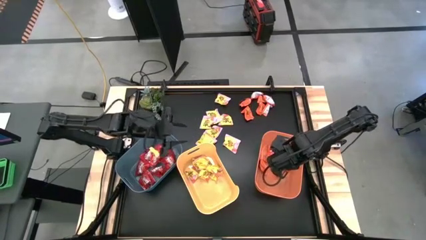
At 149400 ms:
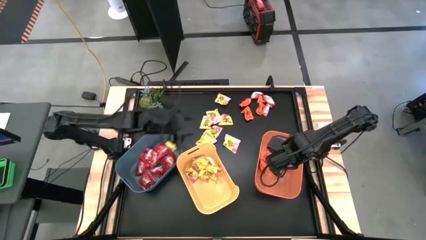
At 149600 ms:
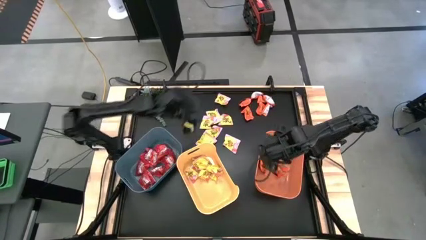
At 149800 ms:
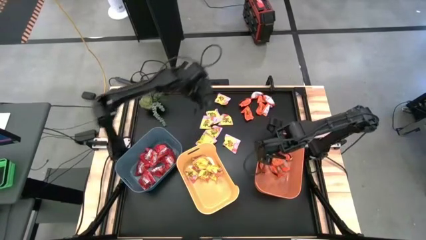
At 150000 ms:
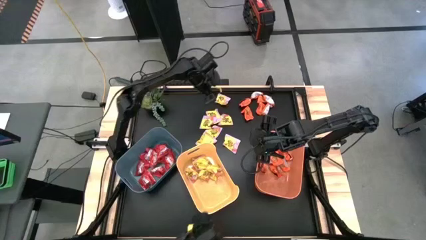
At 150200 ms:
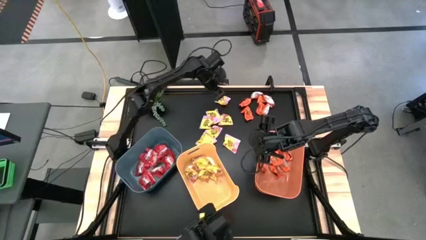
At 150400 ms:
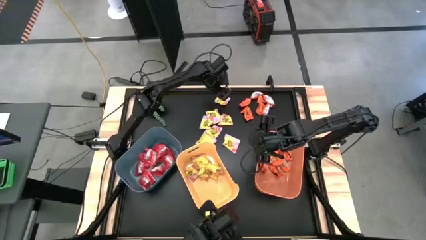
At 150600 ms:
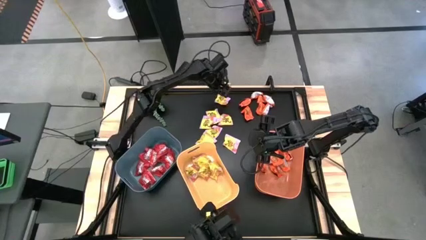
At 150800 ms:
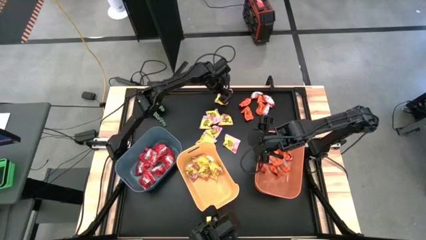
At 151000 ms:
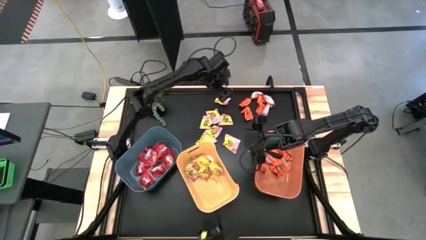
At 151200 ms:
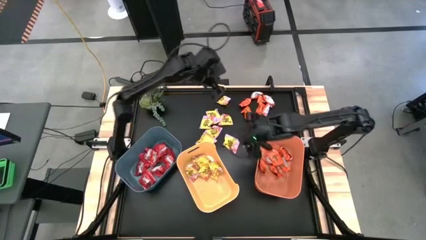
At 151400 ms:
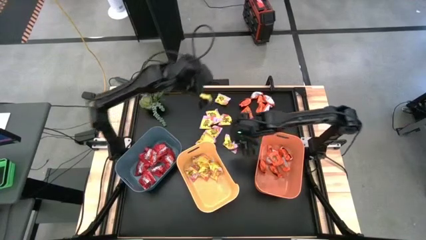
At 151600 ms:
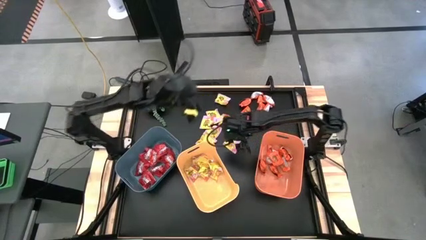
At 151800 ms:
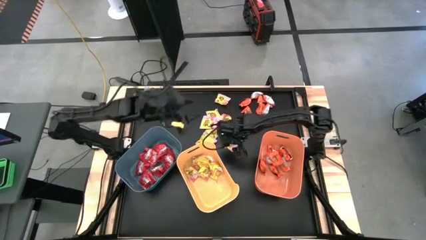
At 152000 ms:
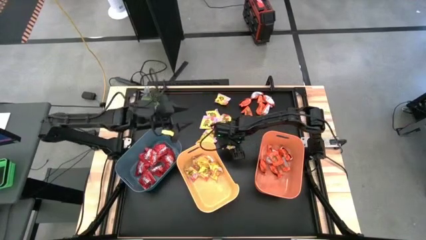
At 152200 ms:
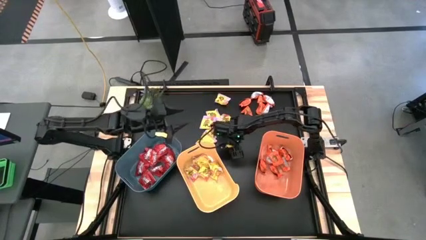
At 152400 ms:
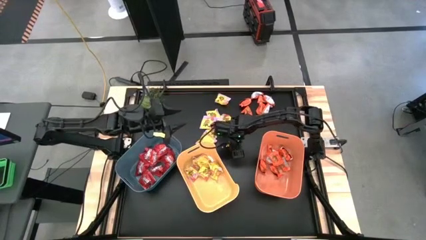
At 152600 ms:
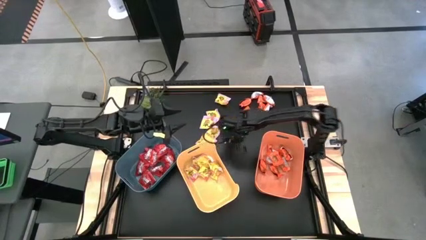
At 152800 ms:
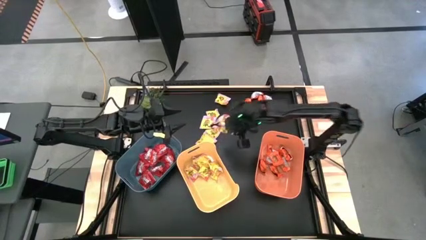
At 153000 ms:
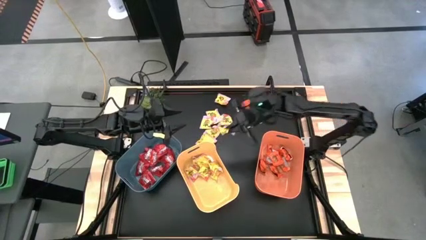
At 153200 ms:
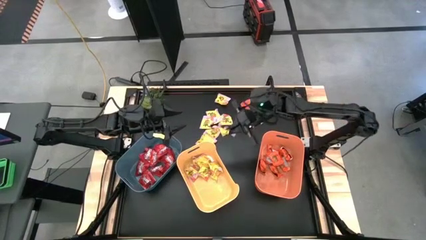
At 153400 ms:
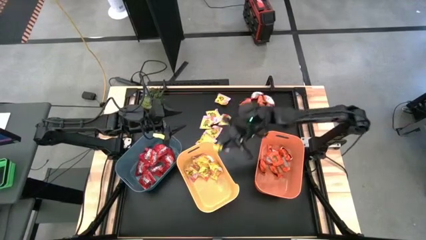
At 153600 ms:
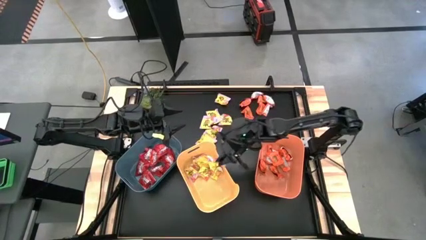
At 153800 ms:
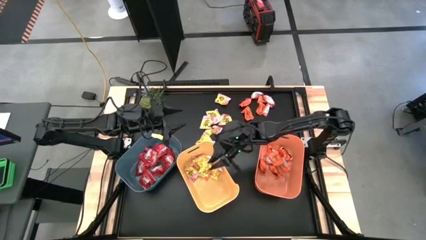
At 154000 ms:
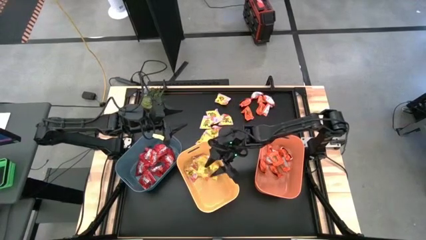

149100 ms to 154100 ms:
Task: Sort candy
Put the yellow candy into the yellow bin

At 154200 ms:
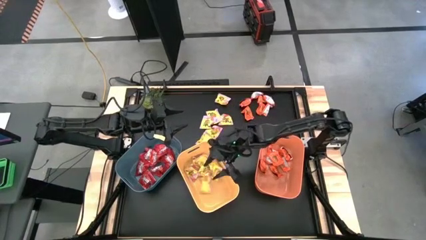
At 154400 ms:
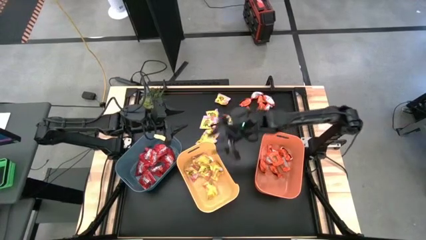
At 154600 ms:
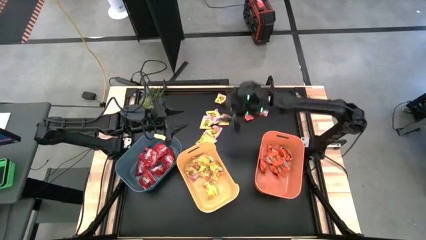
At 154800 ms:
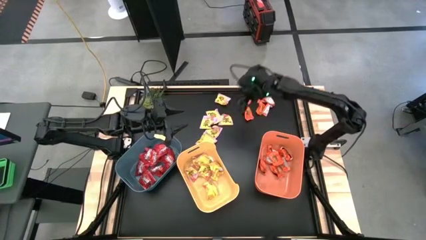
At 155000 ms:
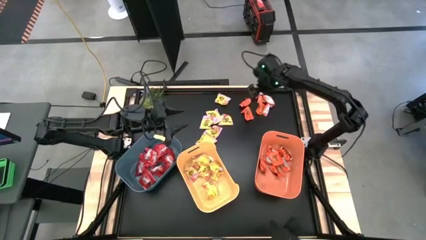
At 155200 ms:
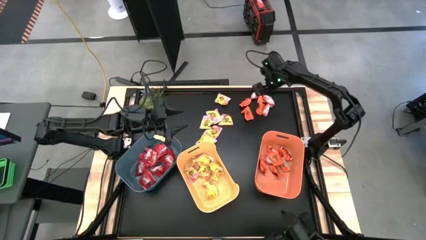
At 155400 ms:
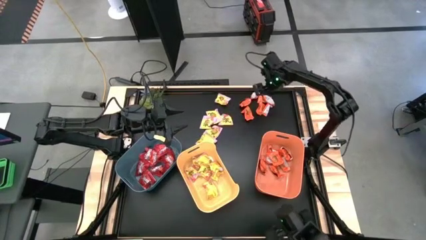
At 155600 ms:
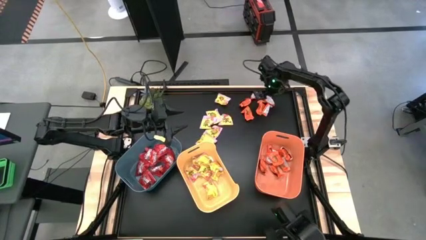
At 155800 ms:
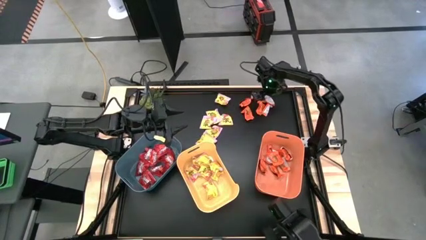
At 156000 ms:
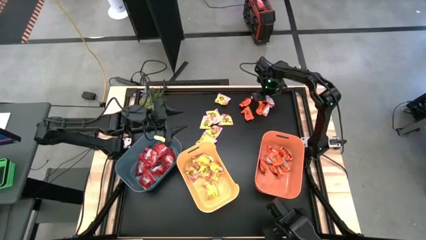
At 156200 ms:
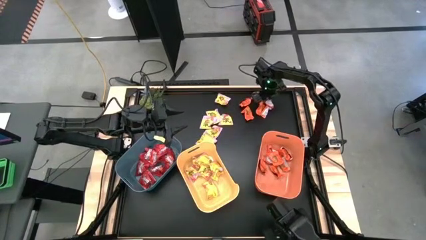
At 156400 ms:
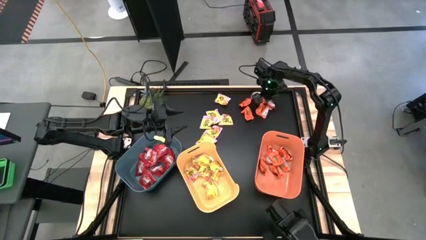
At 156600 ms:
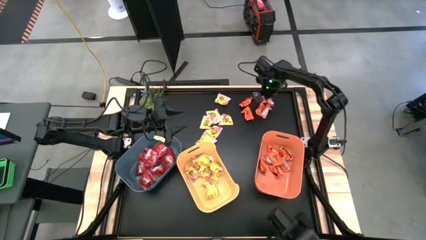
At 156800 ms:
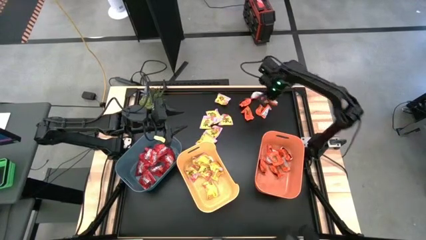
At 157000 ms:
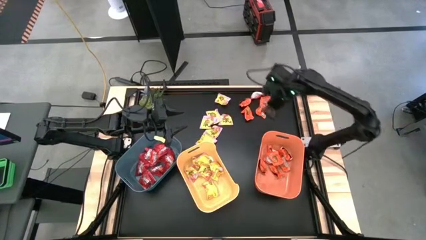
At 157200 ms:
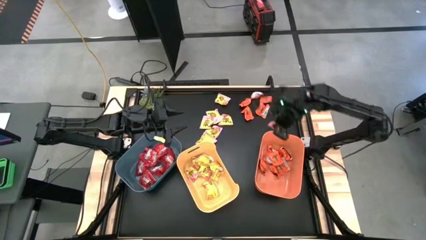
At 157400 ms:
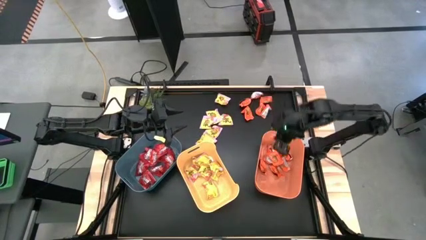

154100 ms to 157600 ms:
Put the orange chocolate into the orange bin

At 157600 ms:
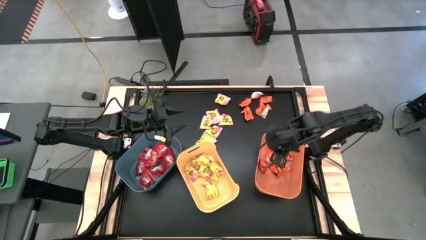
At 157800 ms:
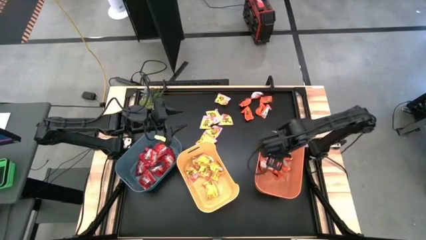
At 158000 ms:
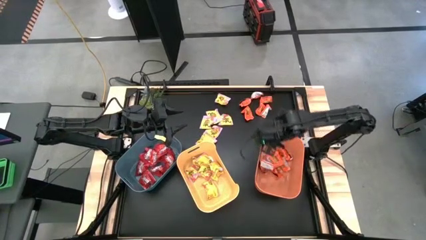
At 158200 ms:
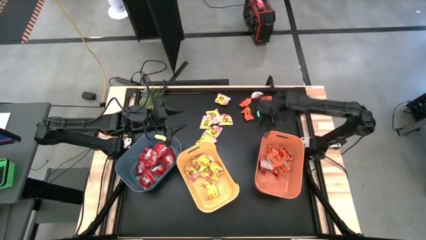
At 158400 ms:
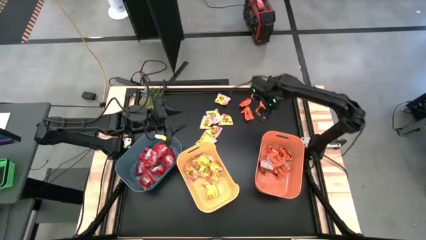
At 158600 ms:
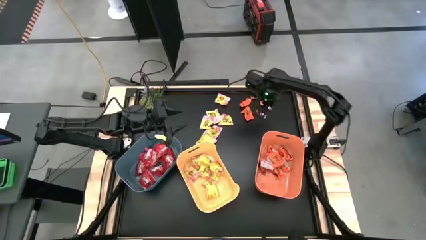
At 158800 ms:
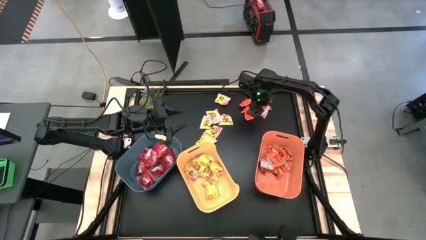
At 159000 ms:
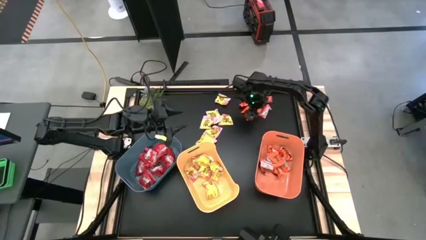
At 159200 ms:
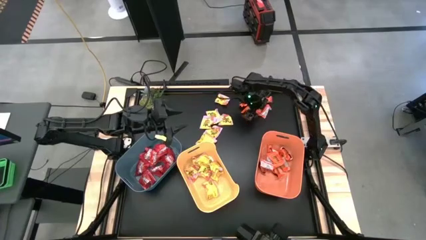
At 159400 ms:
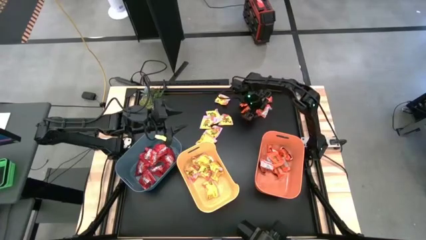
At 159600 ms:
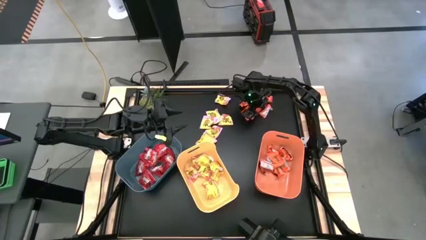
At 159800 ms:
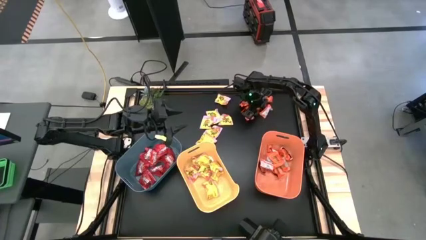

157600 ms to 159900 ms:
Put the orange chocolate into the orange bin

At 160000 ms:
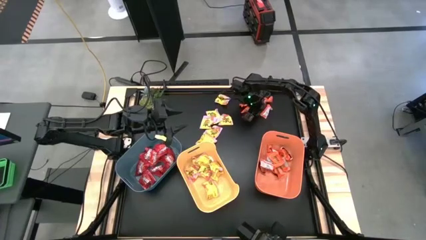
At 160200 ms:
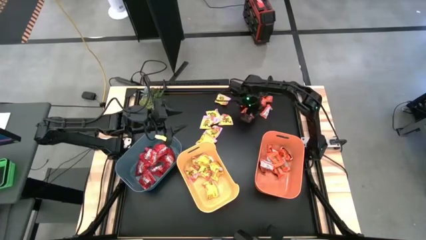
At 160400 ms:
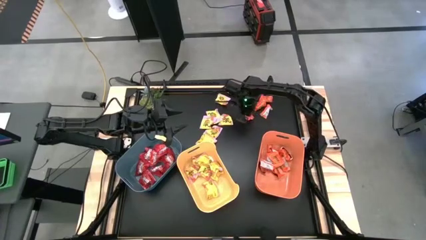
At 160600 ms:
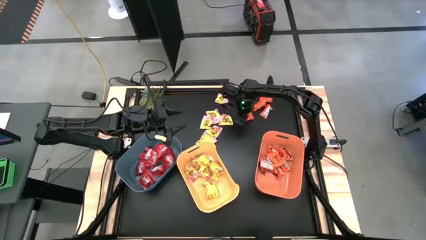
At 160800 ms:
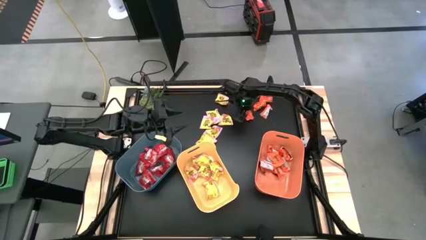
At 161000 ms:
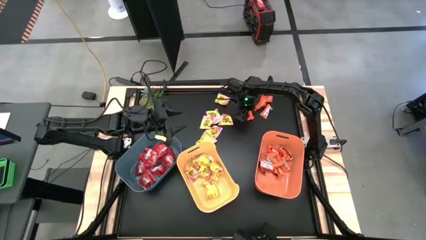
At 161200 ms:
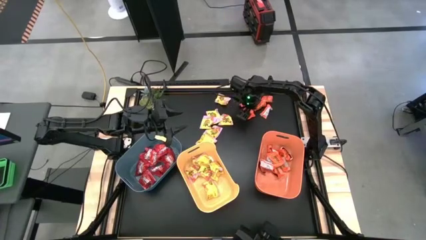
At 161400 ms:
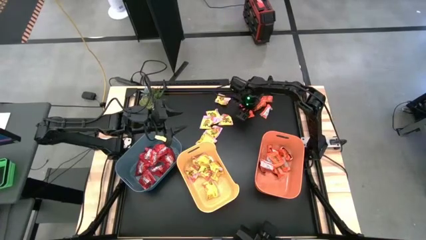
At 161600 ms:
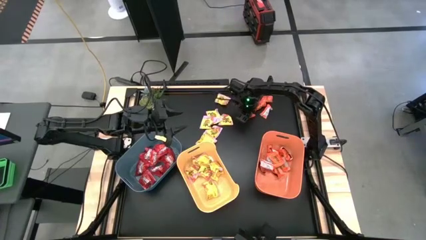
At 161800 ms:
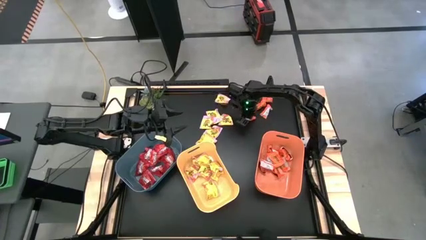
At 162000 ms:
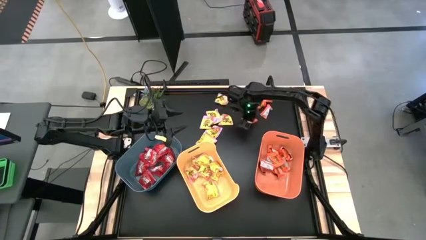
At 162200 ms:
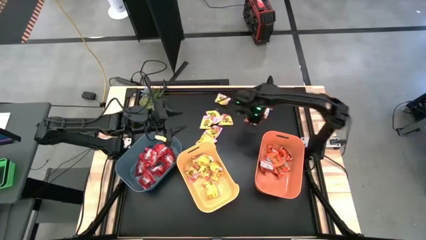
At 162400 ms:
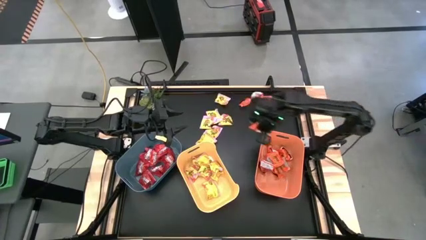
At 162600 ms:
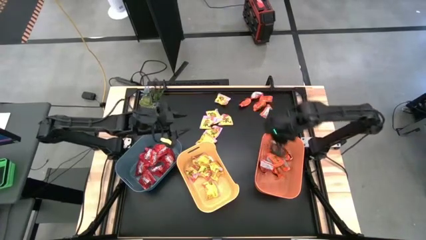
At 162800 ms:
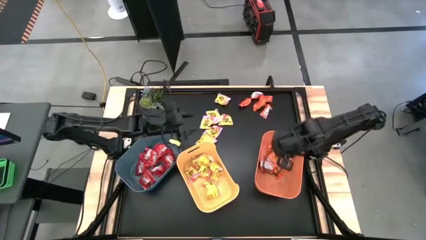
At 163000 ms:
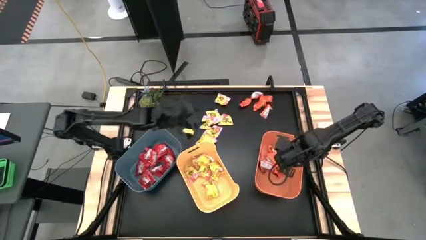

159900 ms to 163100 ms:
Put the orange chocolate into the orange bin

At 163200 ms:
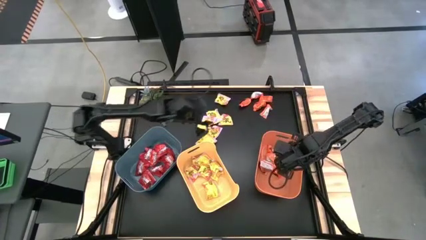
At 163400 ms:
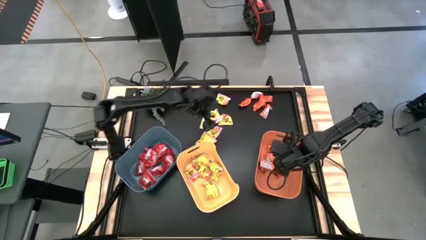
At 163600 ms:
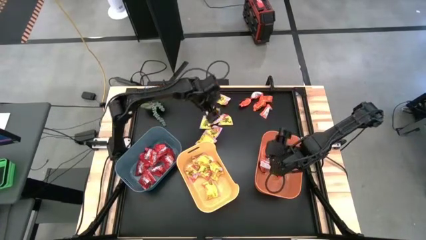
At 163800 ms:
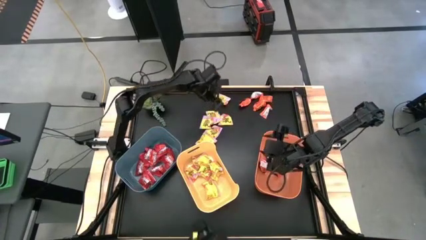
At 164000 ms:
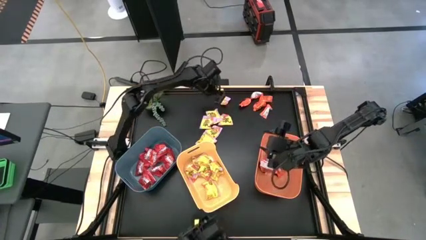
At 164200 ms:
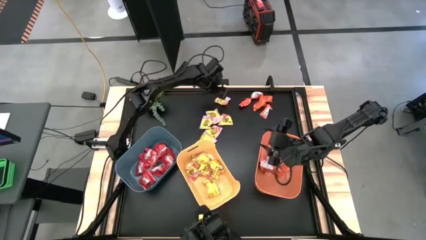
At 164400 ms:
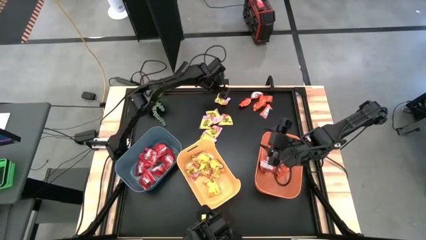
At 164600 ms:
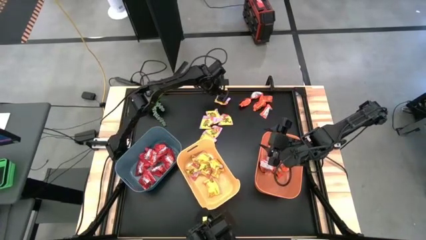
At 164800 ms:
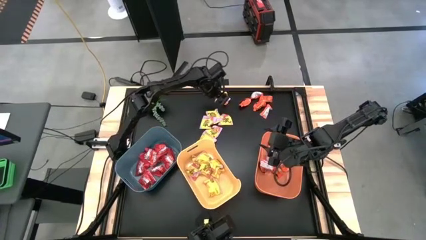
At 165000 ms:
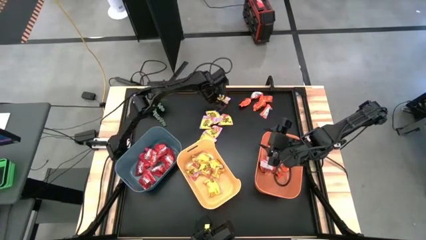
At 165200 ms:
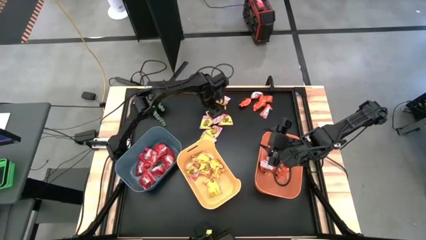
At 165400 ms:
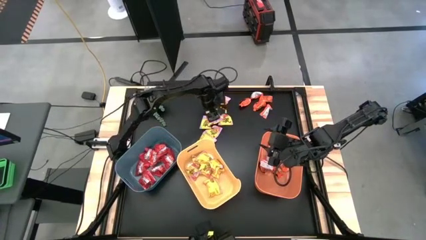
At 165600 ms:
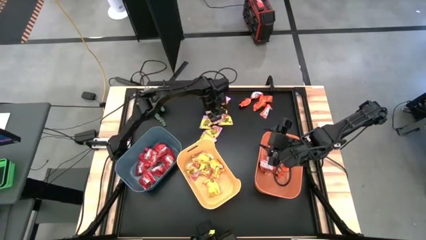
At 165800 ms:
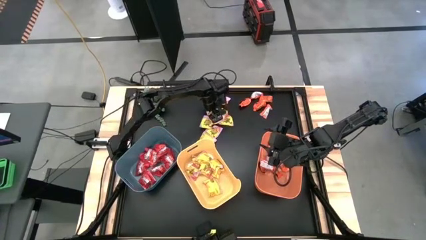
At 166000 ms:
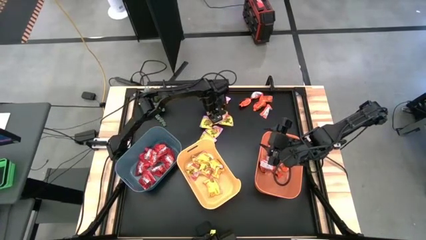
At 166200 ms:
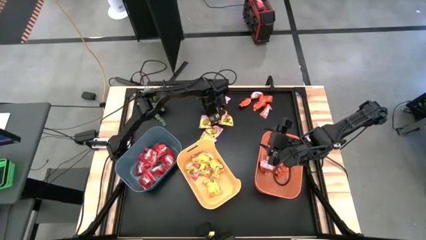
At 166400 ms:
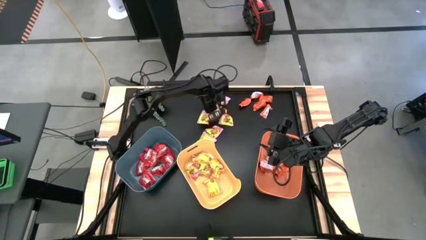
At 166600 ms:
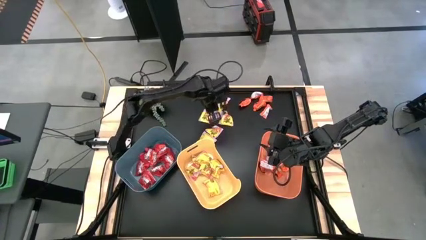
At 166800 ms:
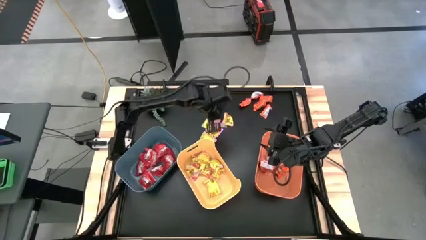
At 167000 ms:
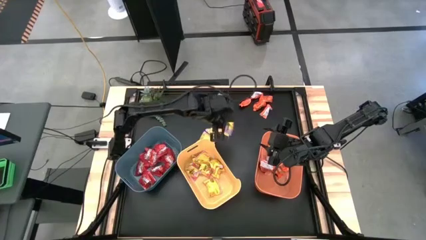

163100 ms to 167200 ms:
Put the yellow candy into the yellow bin

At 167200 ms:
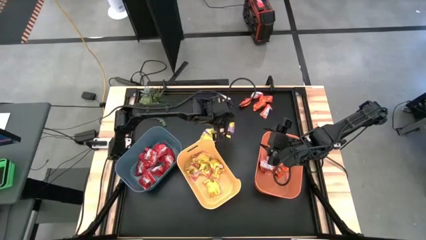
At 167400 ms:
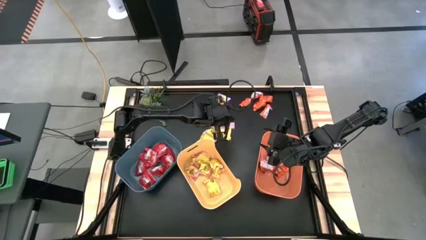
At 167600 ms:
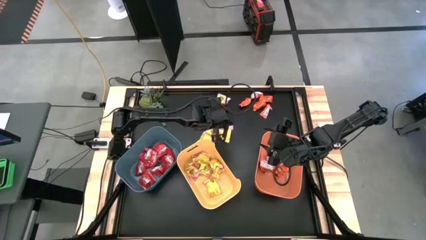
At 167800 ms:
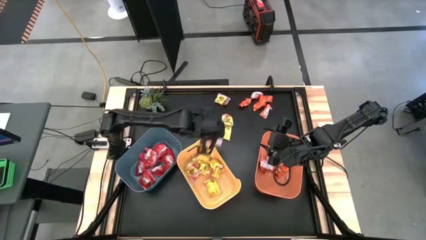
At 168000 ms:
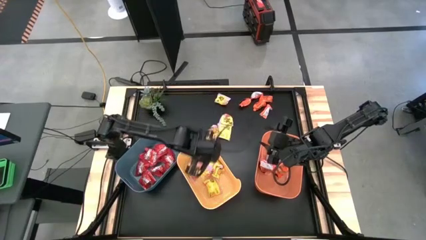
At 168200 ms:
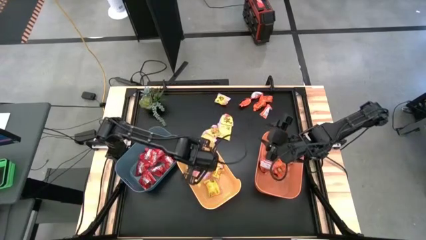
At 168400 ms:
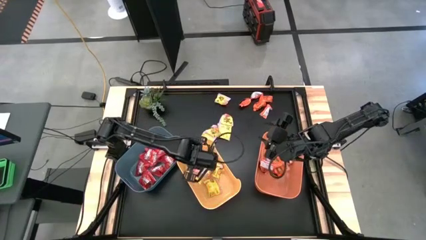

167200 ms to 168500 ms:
Put the yellow candy into the yellow bin
